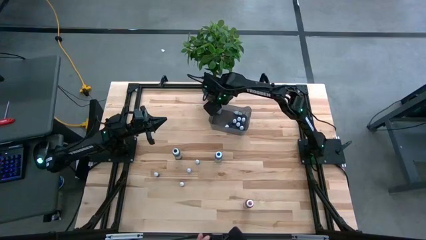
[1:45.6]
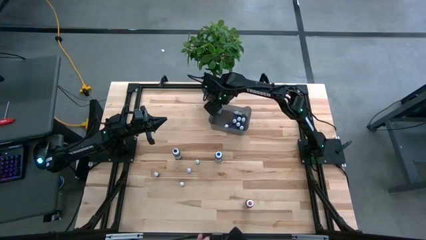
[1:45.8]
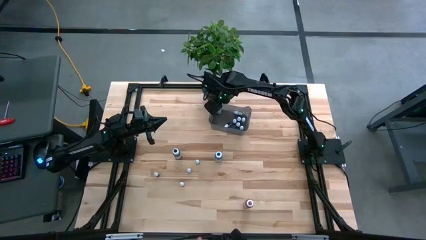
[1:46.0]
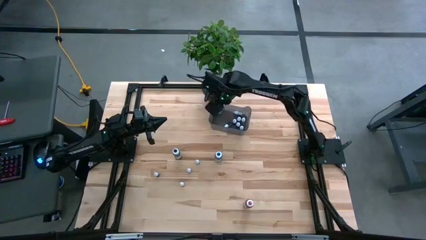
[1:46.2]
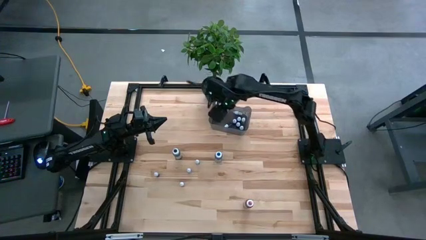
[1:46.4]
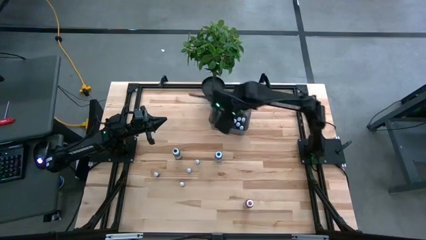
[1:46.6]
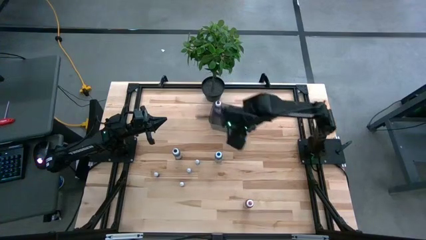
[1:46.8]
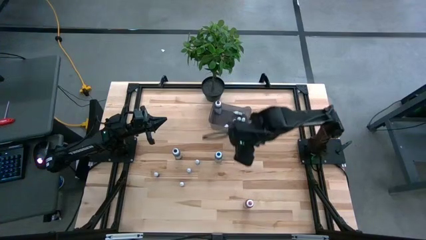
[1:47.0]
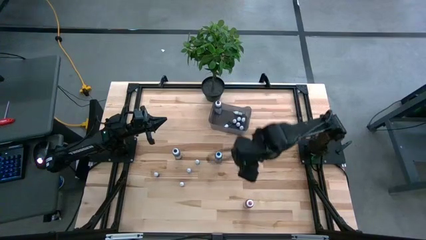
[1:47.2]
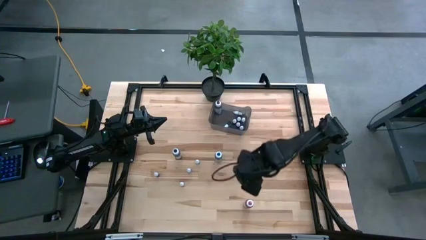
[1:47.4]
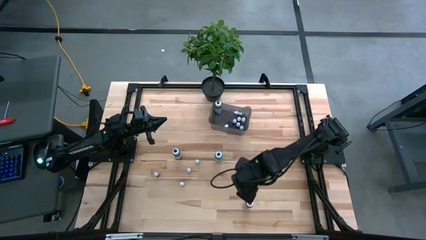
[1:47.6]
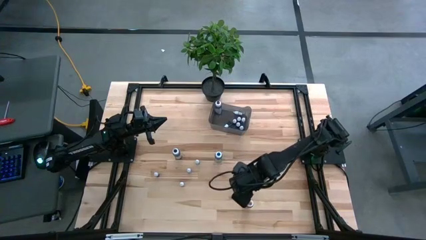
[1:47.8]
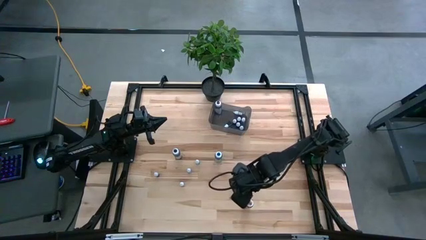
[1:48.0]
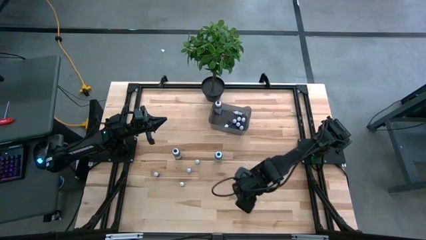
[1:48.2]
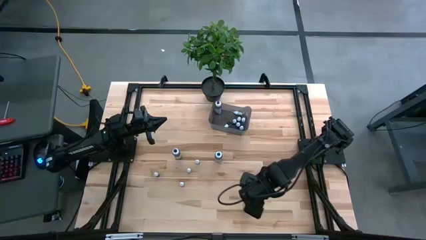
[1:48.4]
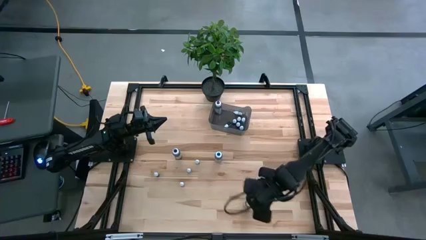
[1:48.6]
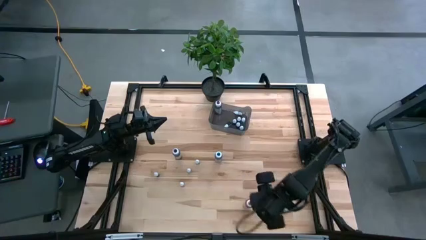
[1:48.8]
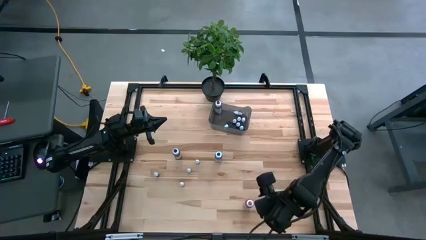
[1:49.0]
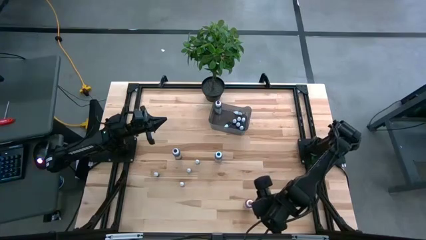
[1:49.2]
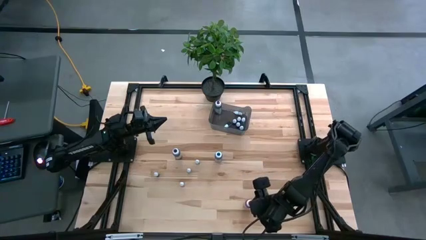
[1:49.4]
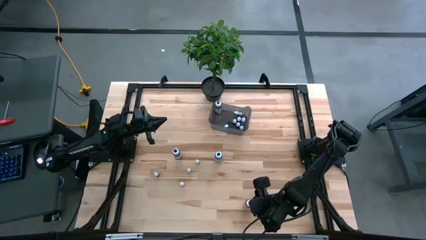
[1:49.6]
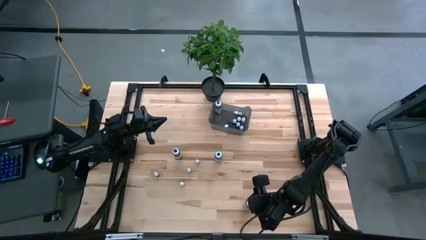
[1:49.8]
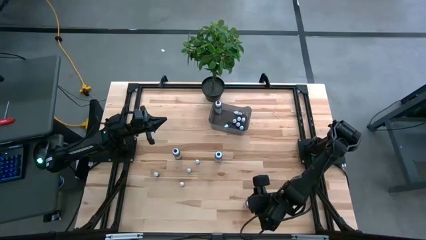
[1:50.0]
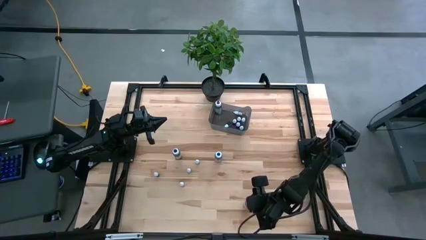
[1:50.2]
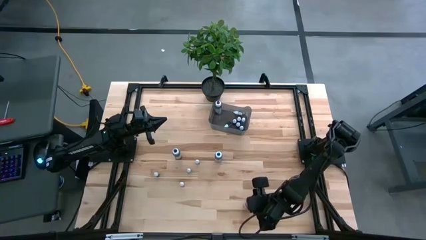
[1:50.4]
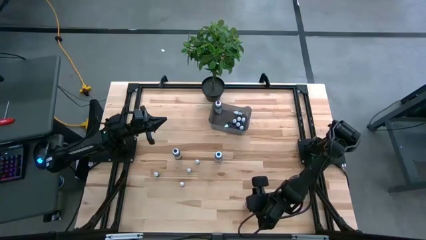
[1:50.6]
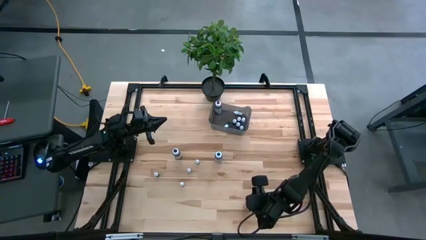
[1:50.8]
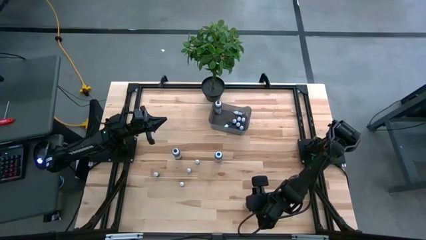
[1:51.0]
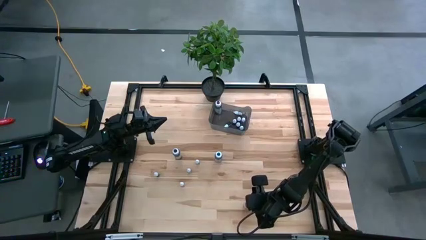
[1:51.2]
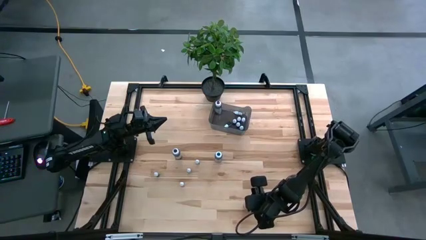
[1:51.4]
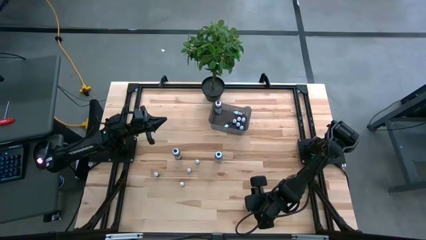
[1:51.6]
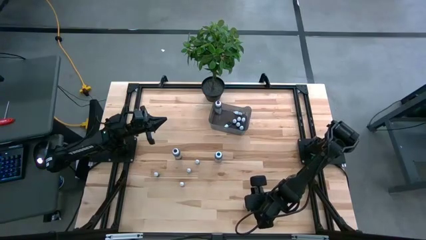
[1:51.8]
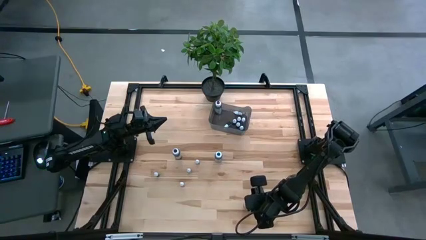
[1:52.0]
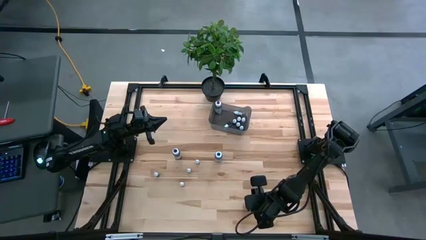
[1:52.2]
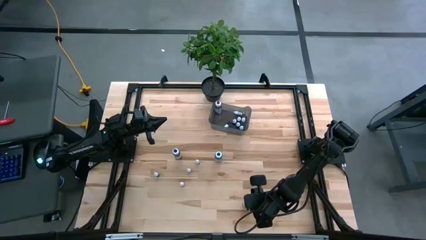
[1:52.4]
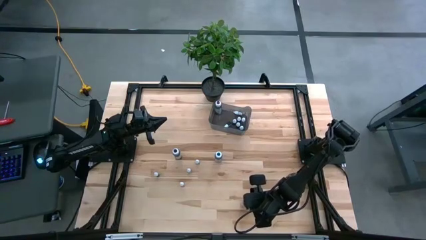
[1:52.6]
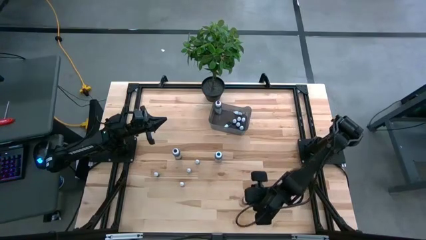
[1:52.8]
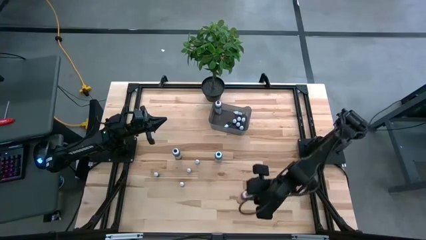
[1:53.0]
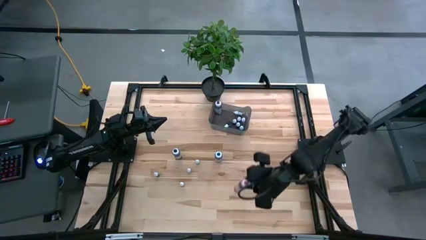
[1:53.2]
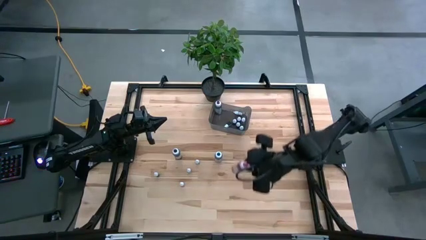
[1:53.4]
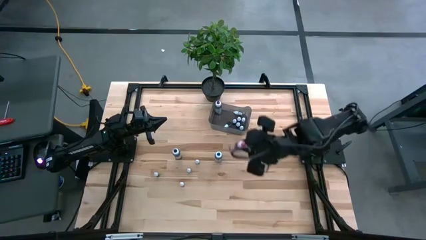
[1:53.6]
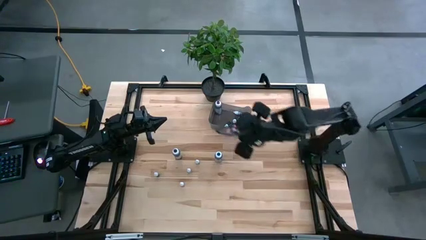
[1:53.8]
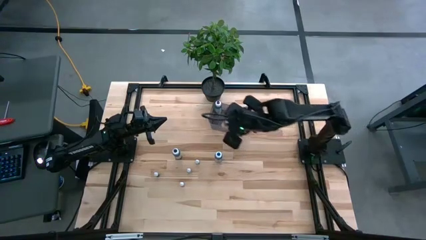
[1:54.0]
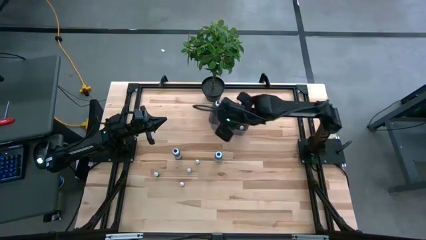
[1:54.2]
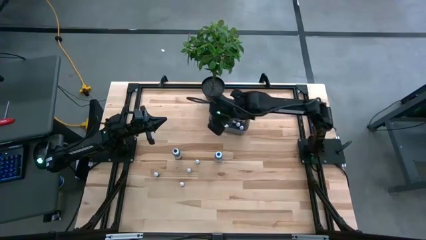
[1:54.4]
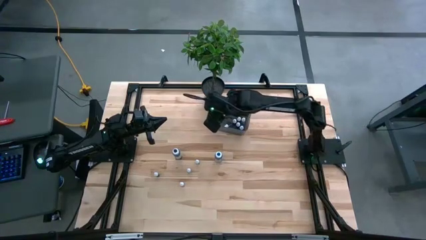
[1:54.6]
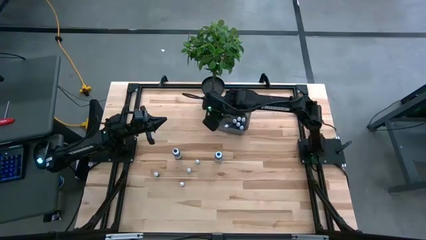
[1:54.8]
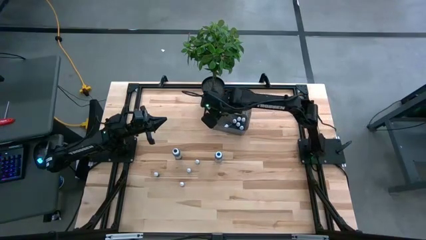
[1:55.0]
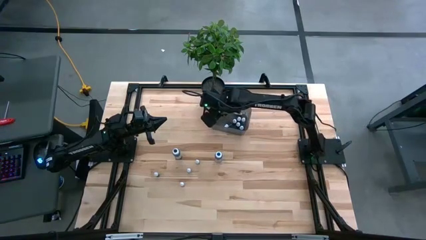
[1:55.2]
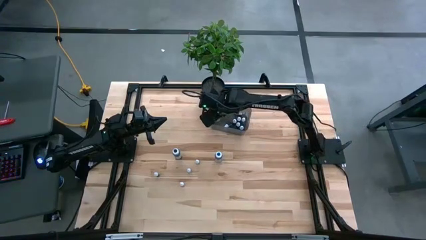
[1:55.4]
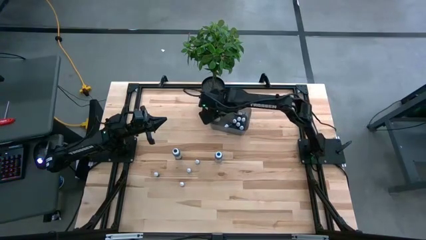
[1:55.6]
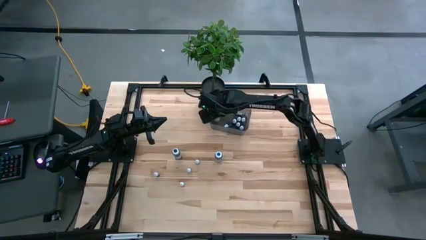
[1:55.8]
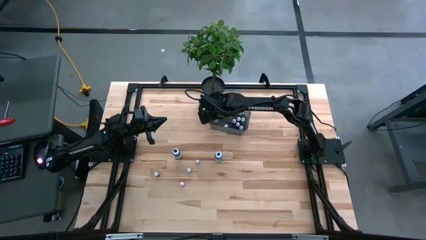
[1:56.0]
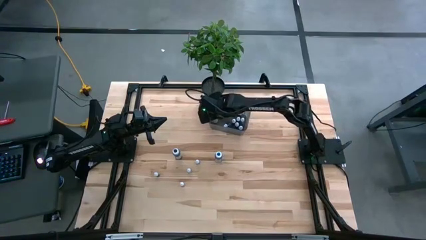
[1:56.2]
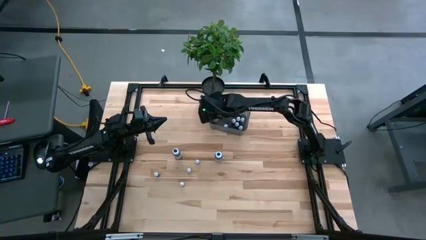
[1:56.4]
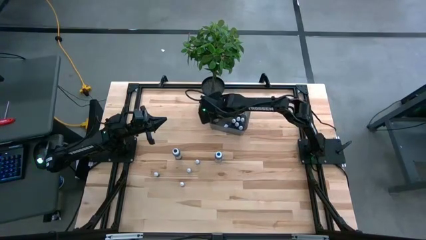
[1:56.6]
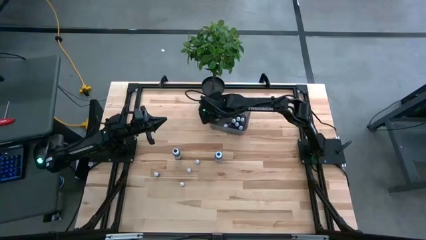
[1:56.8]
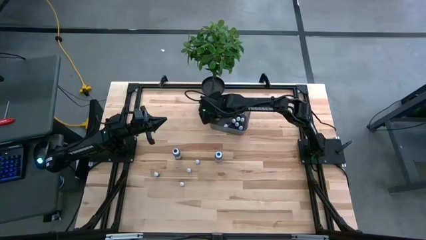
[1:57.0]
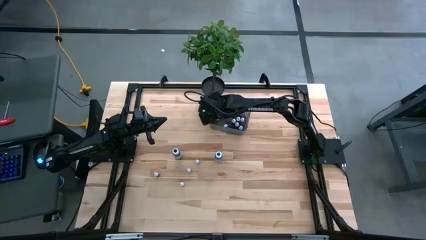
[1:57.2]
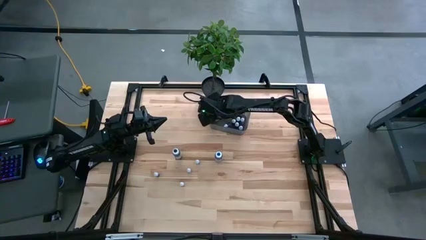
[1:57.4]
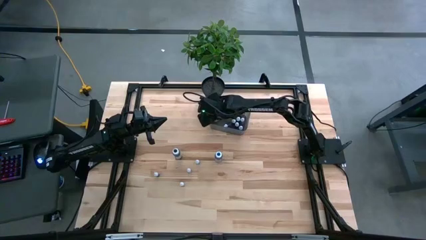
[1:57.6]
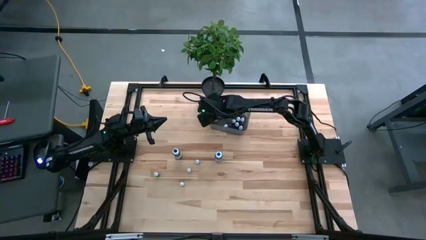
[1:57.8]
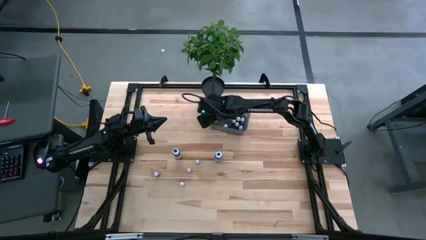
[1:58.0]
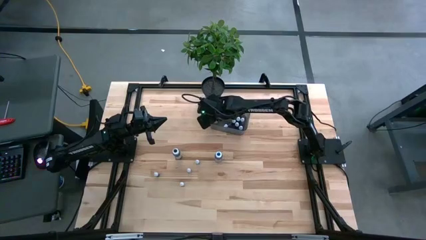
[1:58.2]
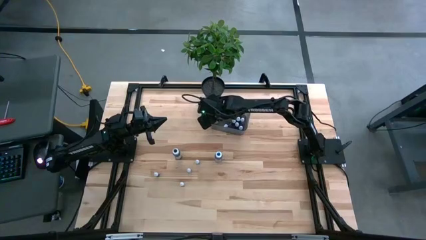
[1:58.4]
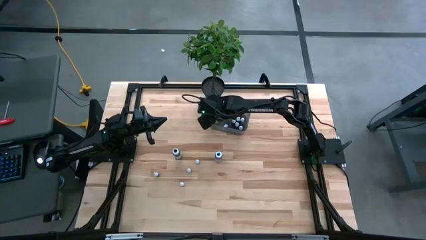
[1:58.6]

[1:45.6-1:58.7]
Task: Pick & Place food coloring
Put the big pink food coloring bottle into the black bin

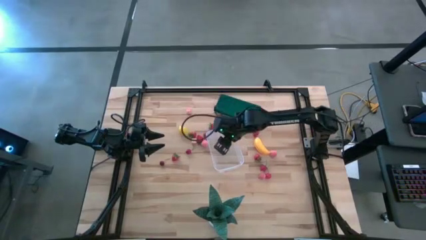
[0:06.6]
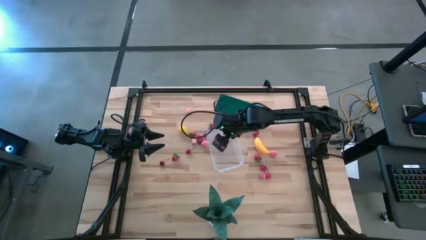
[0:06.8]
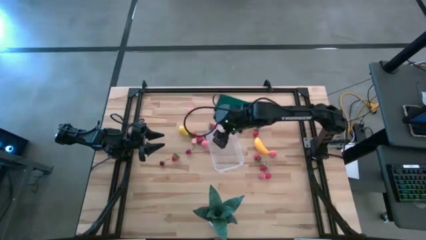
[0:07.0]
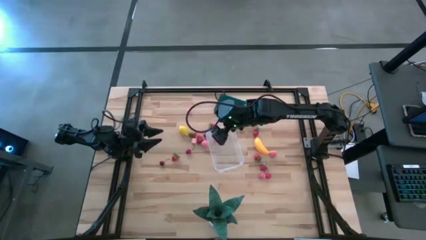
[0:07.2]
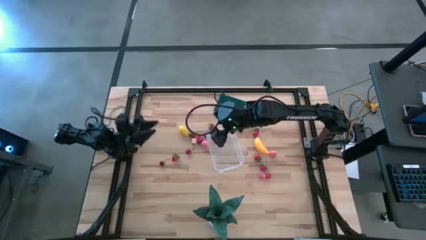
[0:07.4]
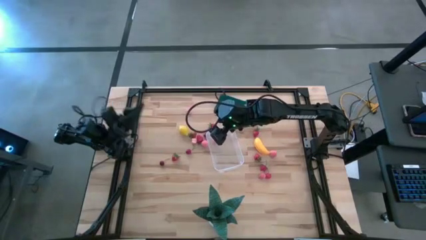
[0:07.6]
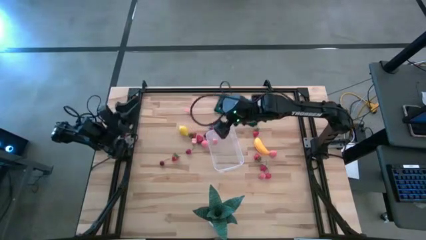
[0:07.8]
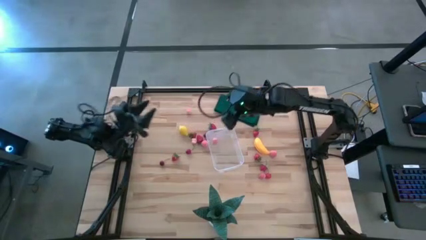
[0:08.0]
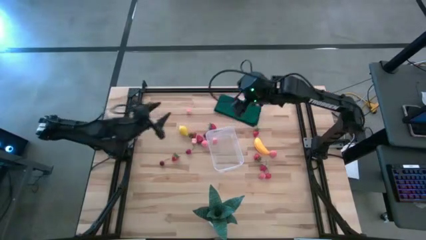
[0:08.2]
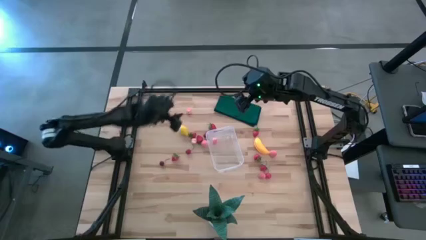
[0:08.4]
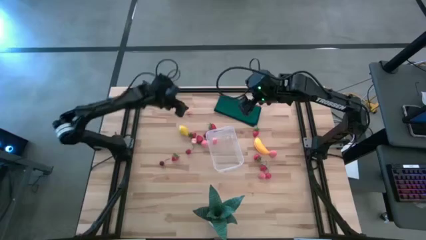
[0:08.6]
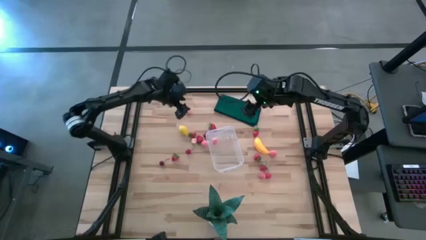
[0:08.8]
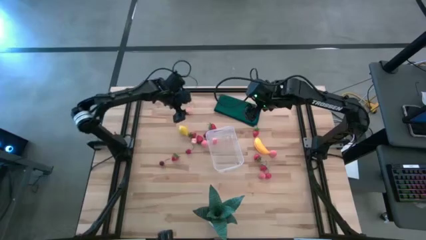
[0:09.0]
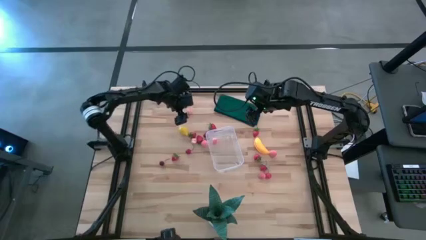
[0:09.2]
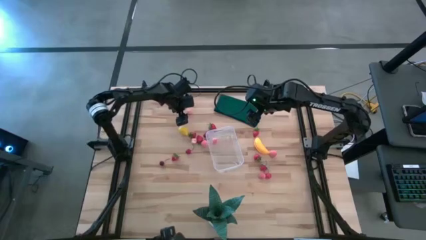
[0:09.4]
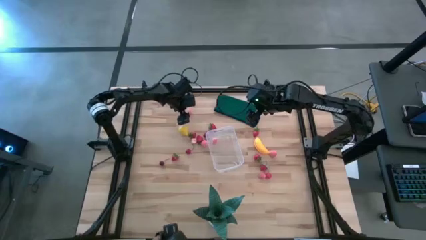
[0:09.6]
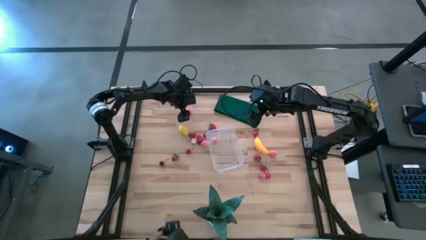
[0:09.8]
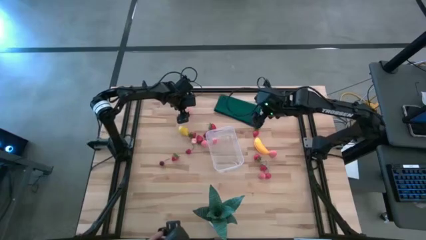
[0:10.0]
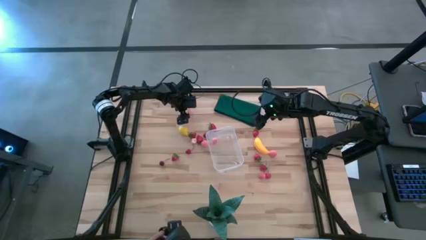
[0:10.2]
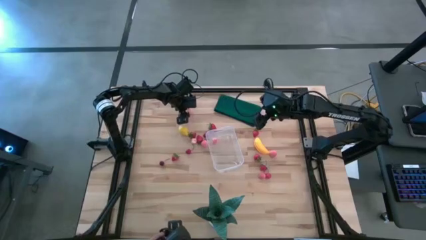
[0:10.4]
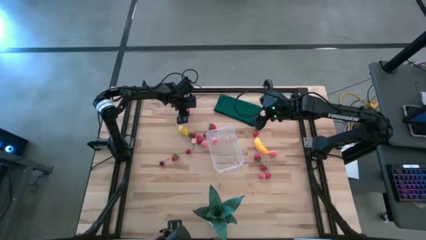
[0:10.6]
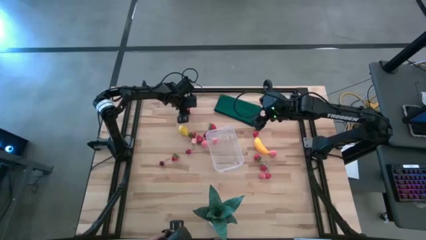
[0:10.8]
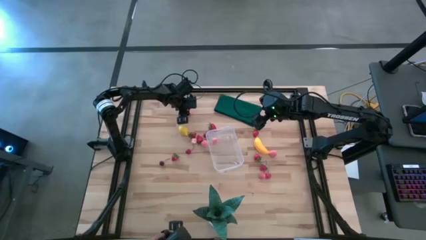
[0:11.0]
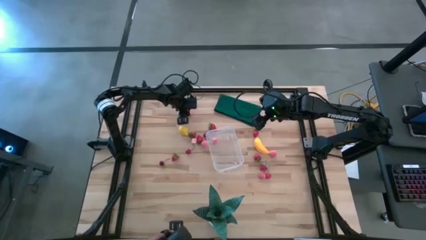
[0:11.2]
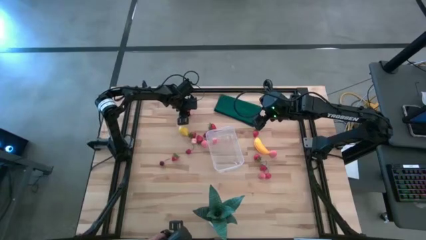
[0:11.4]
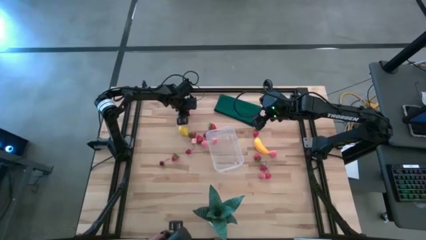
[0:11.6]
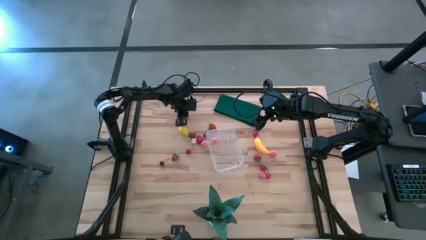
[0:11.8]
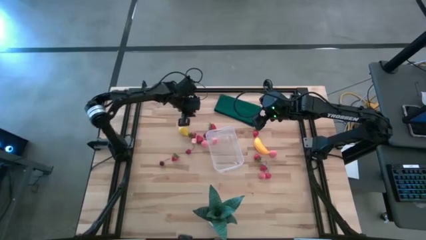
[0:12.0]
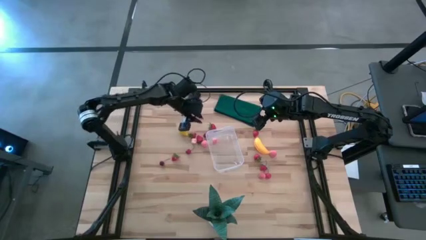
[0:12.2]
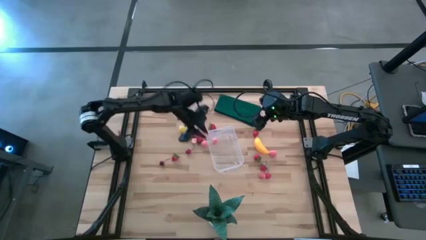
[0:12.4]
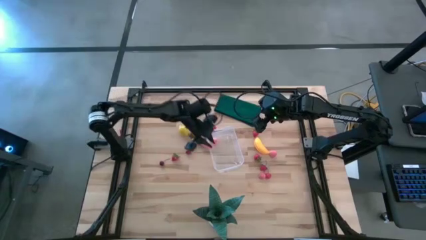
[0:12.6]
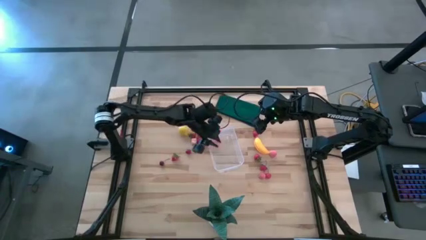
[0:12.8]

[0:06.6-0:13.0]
Task: Pick and placing Produce into tupperware
Put the peach into the transparent bin
